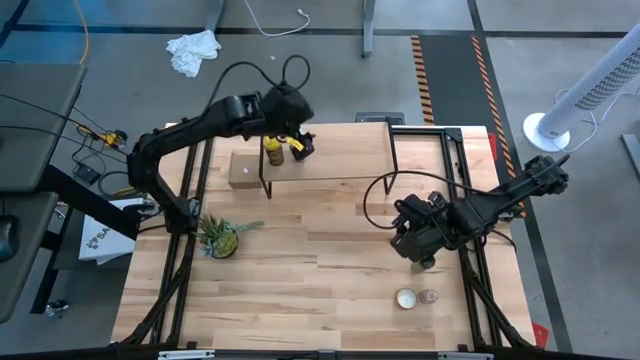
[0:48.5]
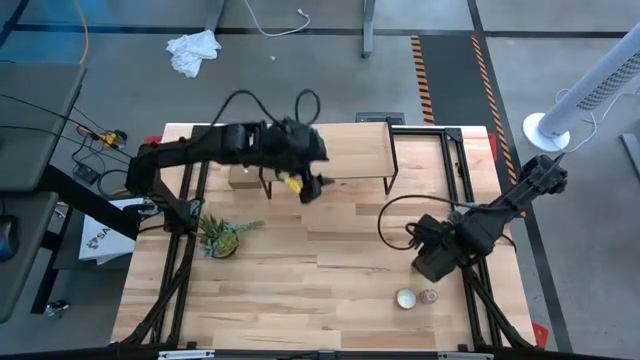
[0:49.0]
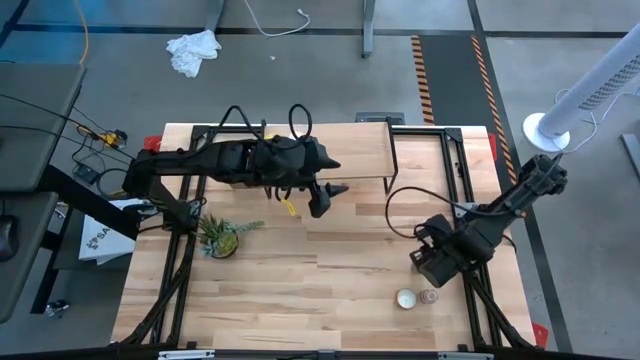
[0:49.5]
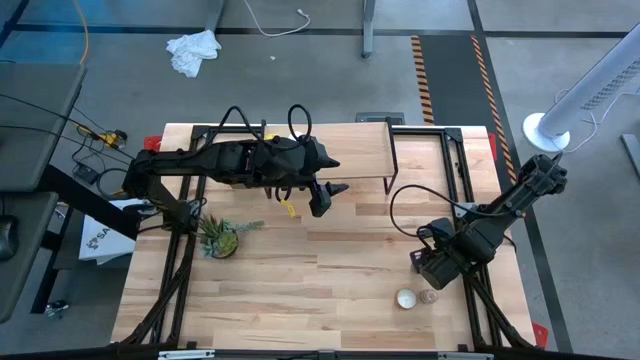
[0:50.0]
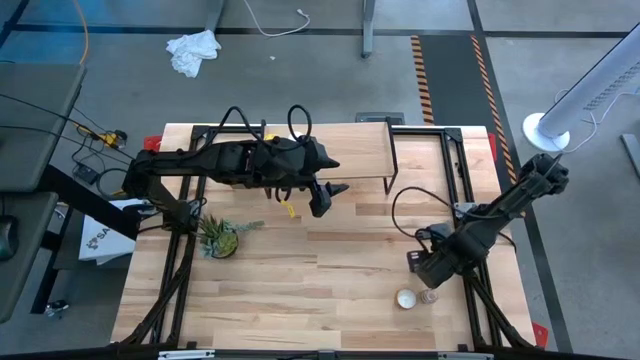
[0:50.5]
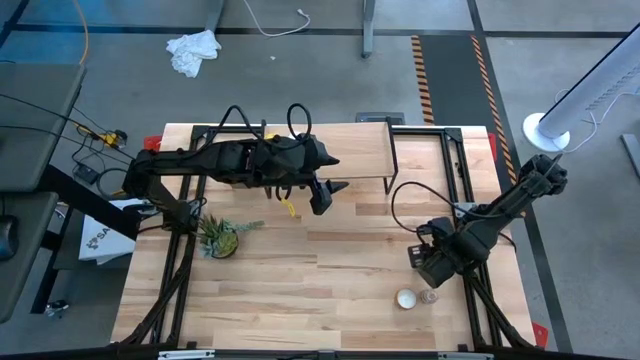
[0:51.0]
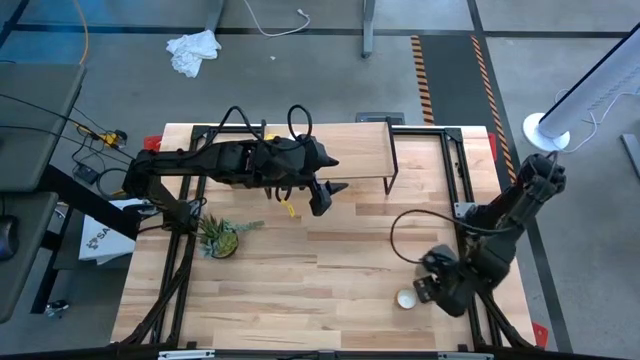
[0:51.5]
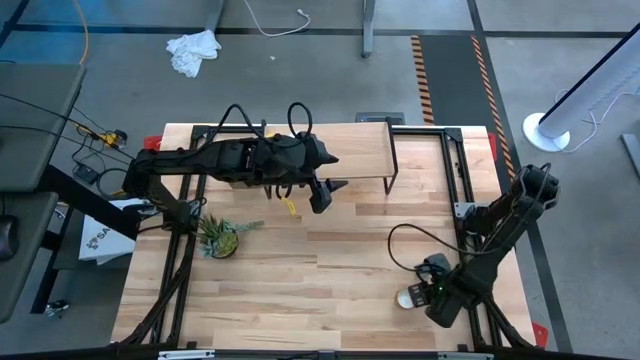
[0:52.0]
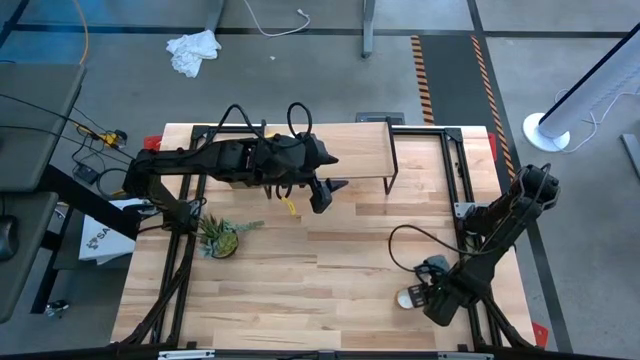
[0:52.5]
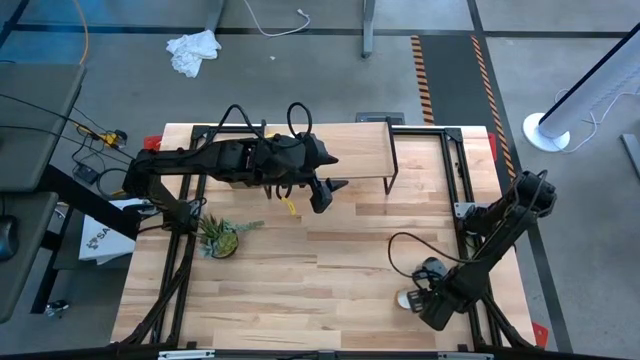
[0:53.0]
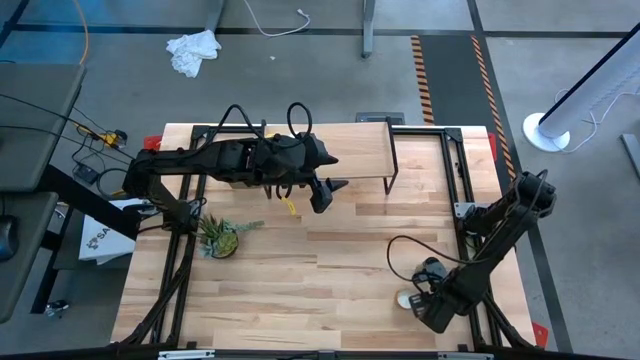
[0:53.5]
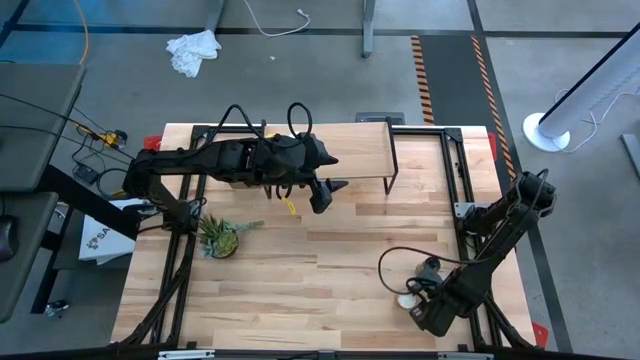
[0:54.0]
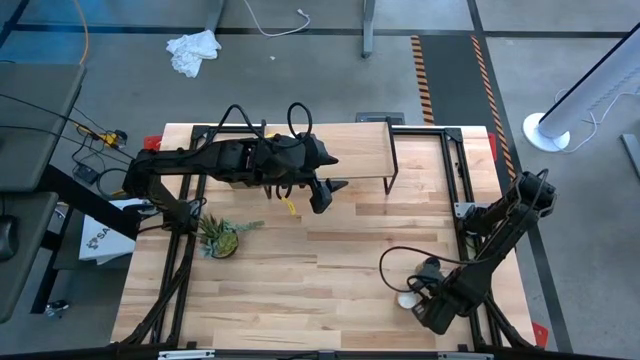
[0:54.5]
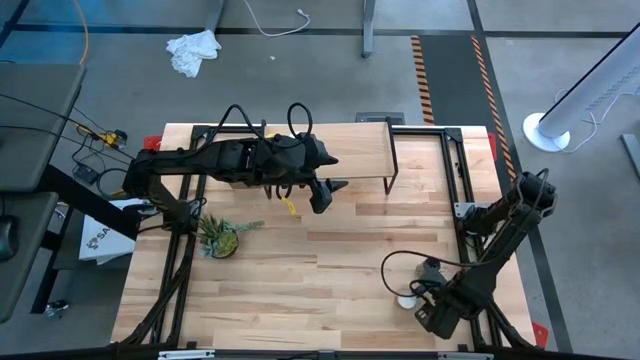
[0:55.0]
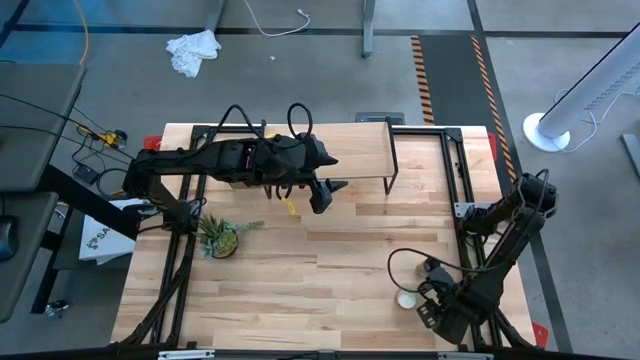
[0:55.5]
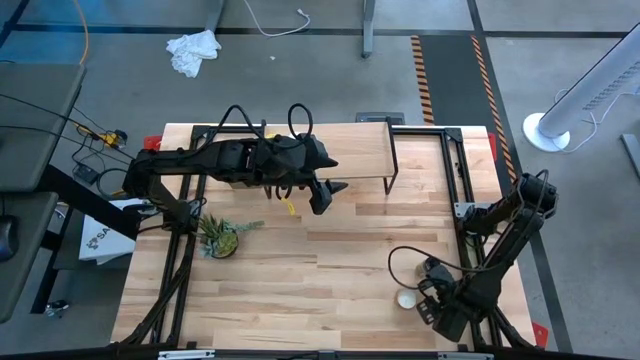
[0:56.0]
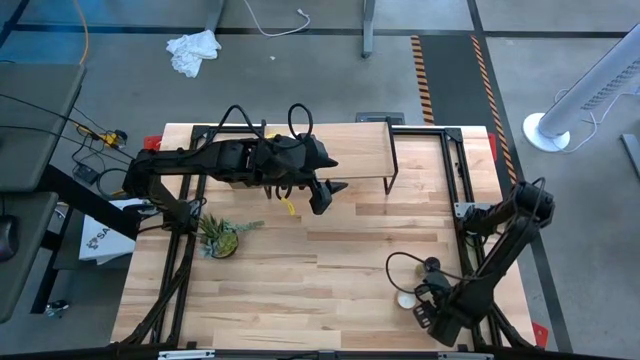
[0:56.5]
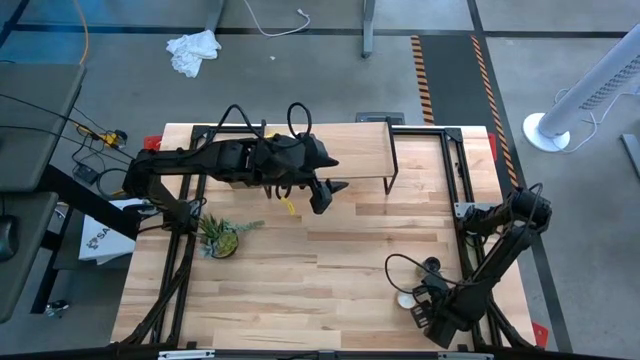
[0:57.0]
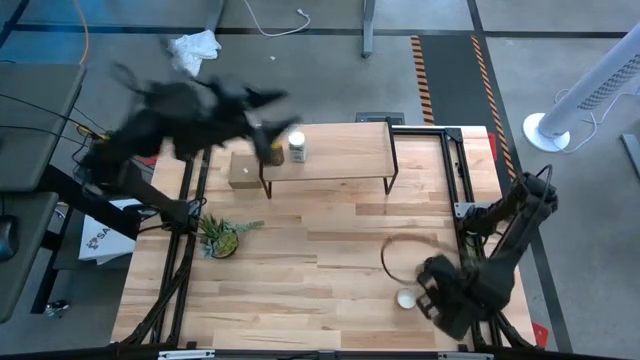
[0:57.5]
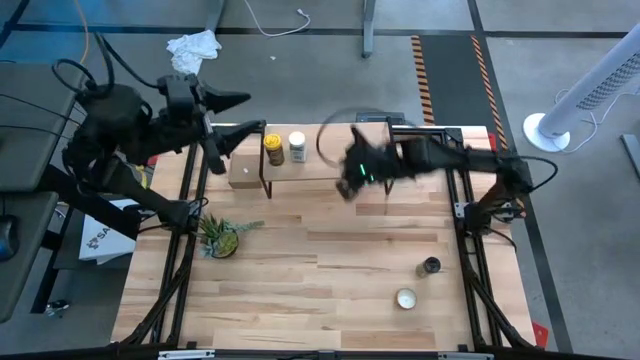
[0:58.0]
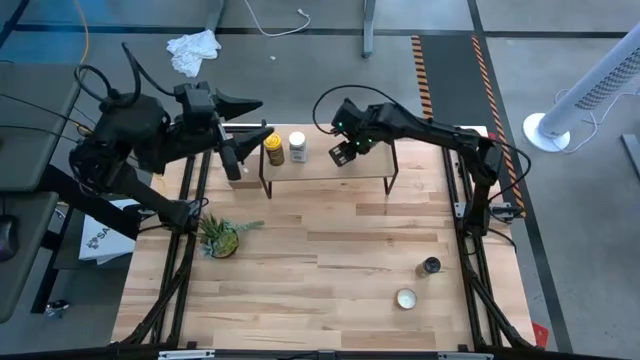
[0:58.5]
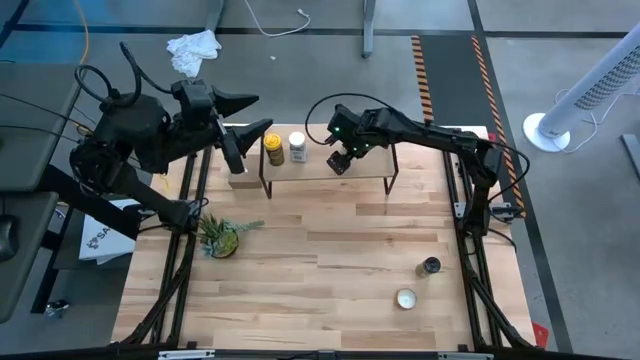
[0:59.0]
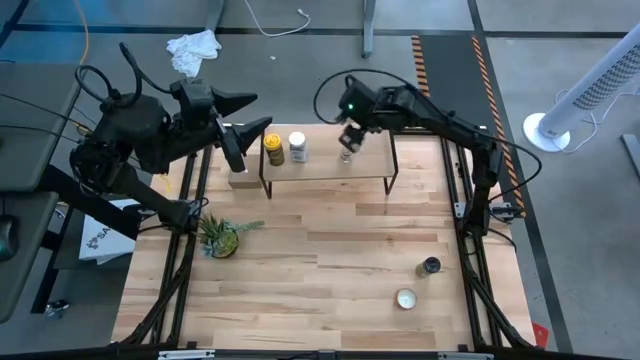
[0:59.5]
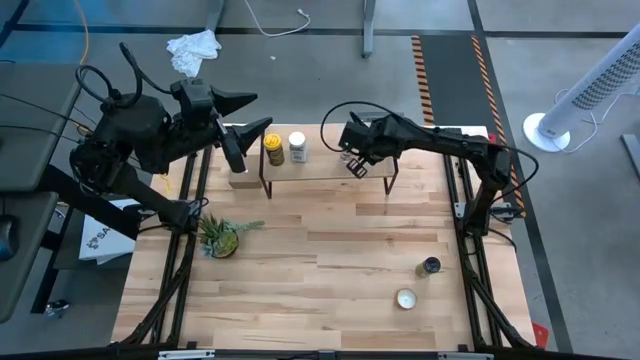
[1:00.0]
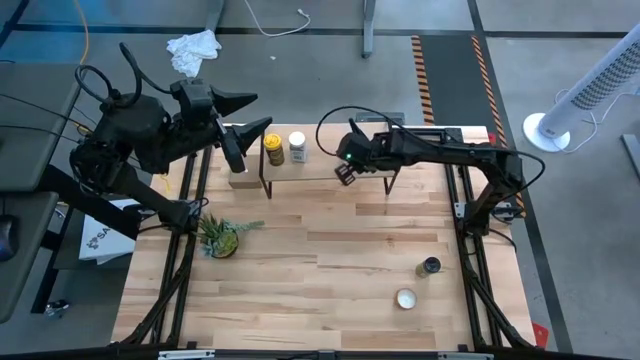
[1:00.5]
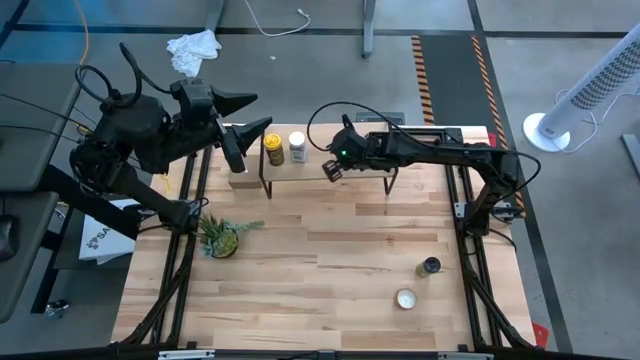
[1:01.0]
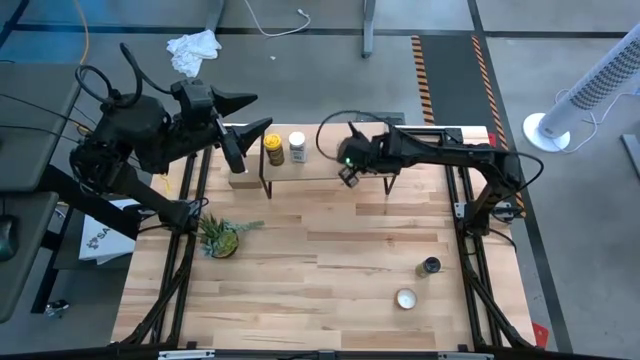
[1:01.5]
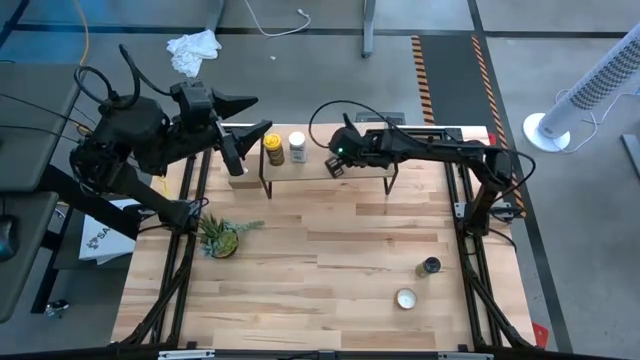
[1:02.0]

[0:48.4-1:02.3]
Task: Shelf spices
Put the black seasoning bottle on the shelf

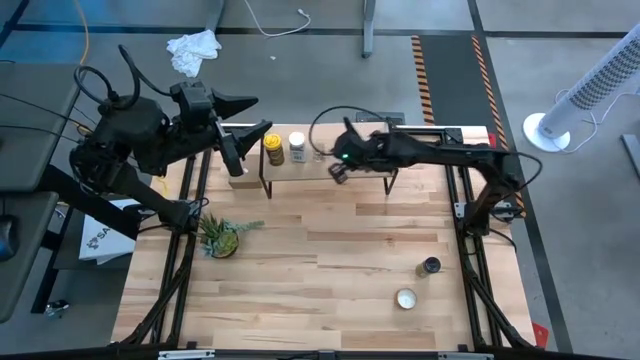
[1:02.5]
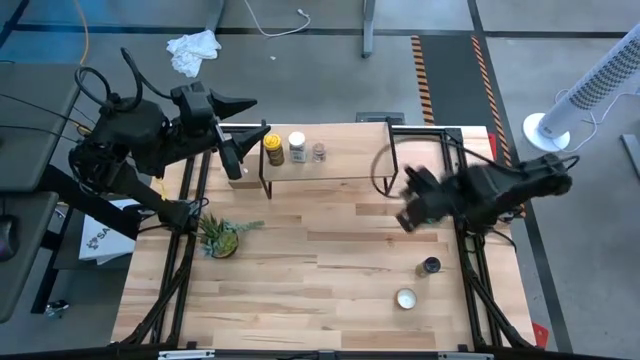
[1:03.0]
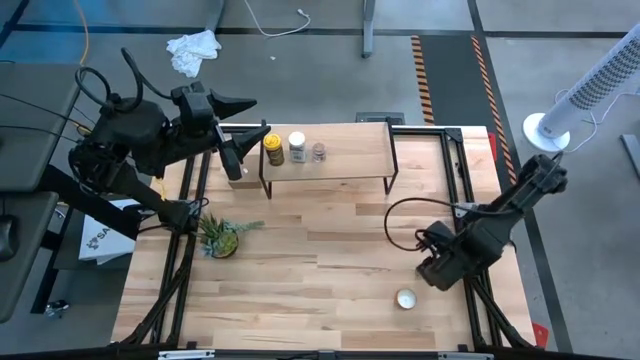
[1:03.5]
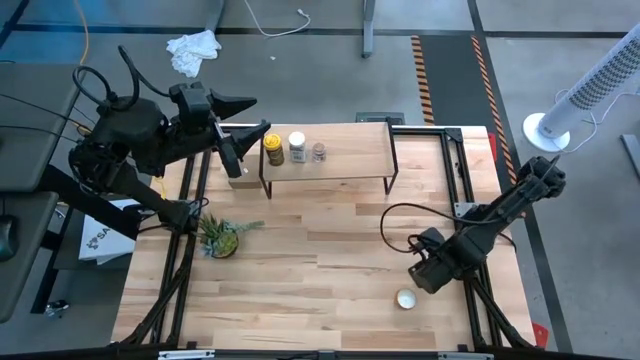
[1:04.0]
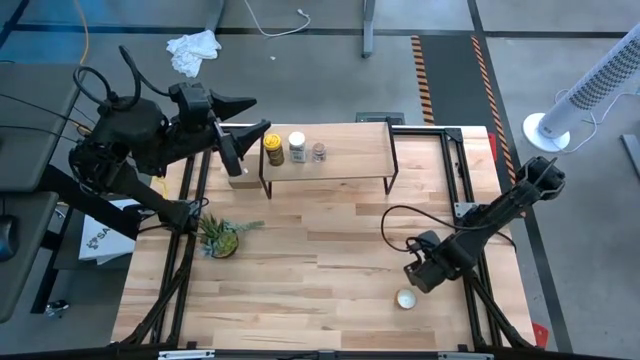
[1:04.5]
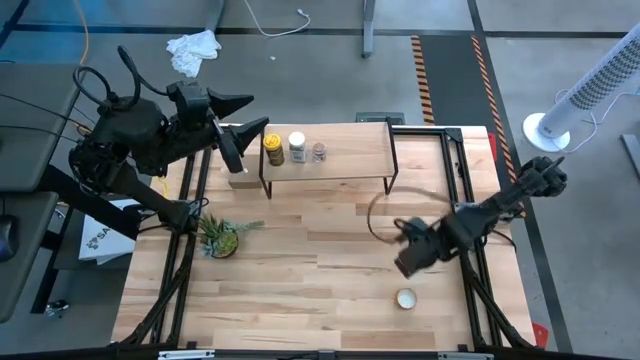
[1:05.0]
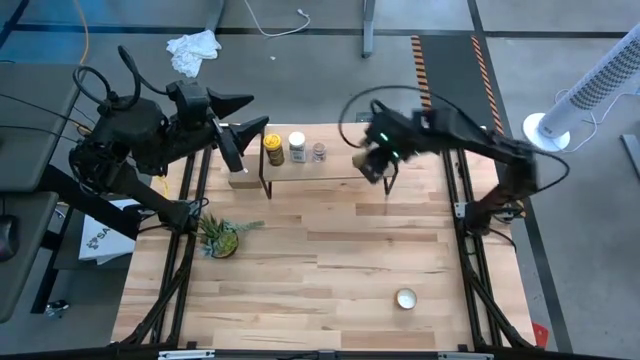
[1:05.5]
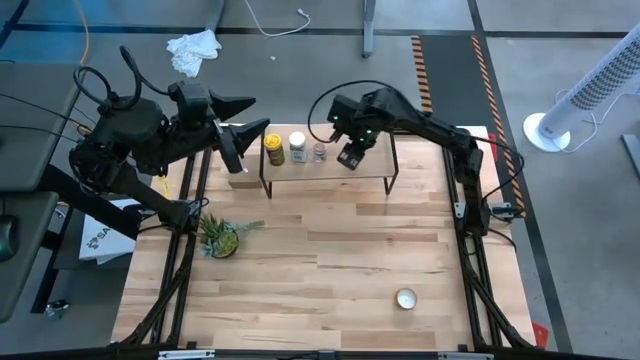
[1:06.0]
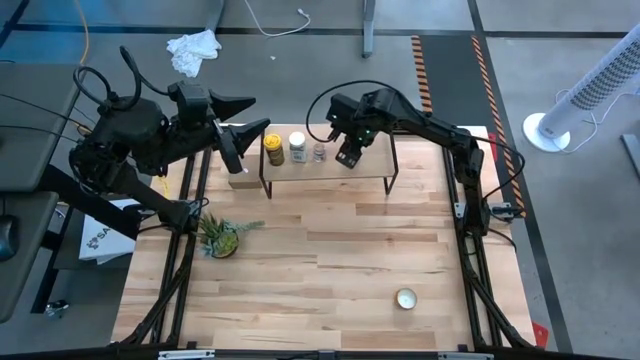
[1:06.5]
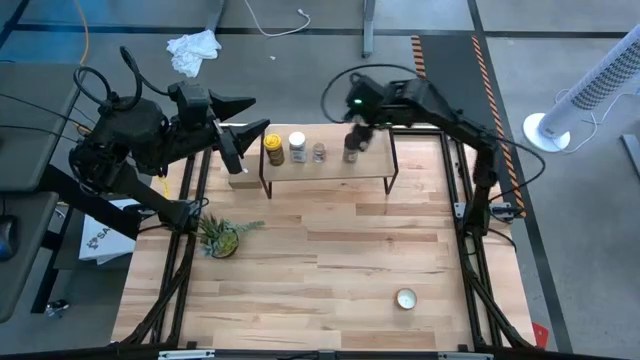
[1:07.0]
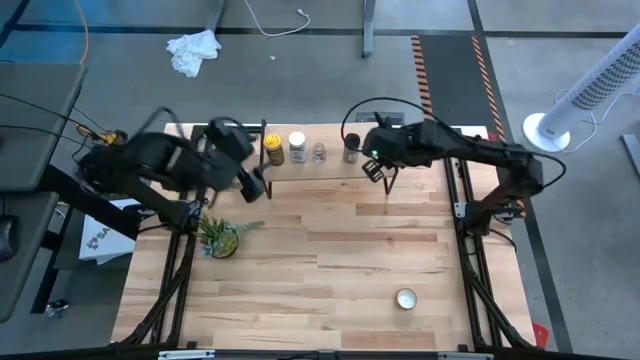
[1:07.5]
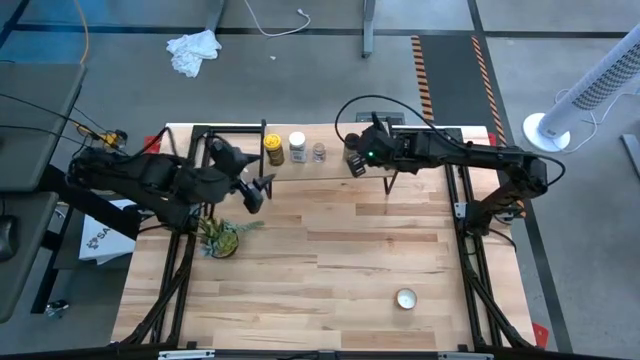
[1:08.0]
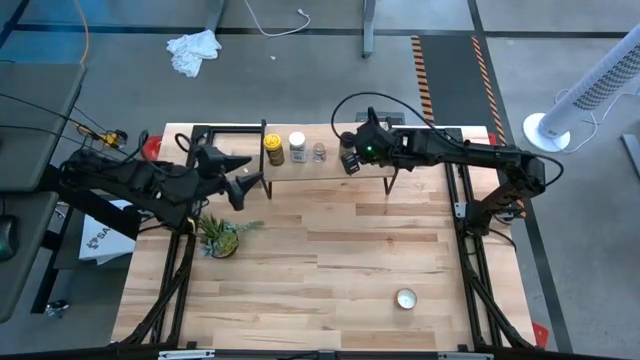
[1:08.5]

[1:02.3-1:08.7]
Put the black seasoning bottle on the shelf

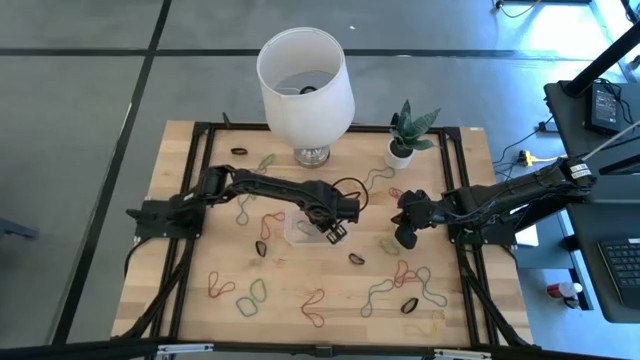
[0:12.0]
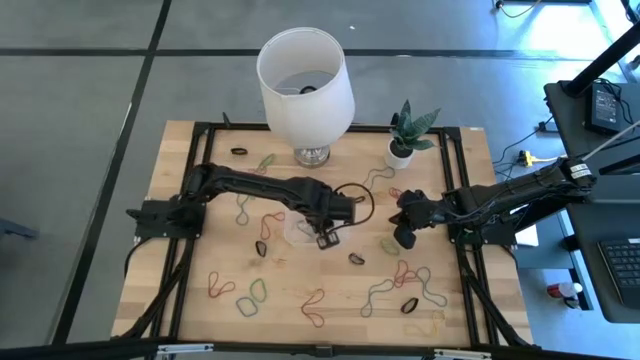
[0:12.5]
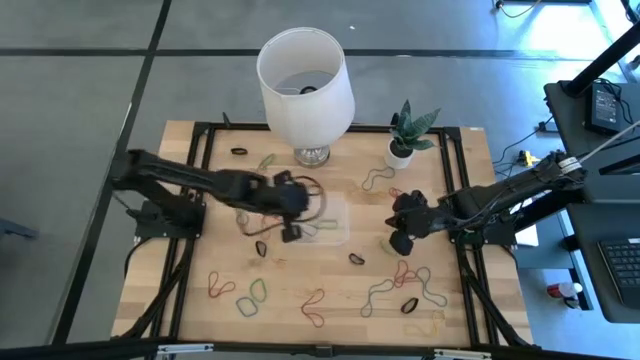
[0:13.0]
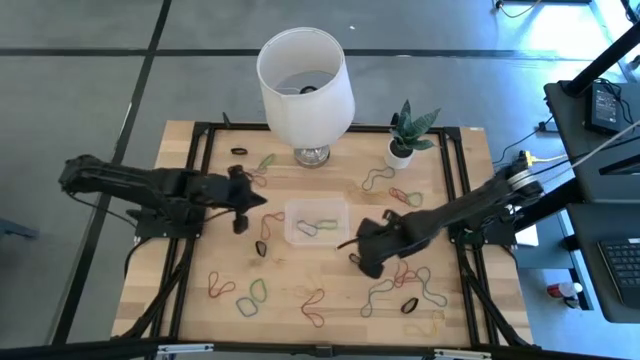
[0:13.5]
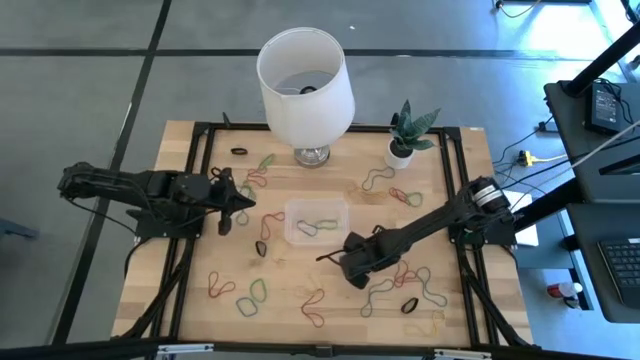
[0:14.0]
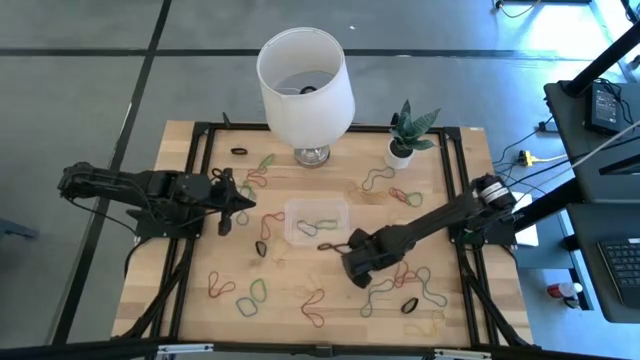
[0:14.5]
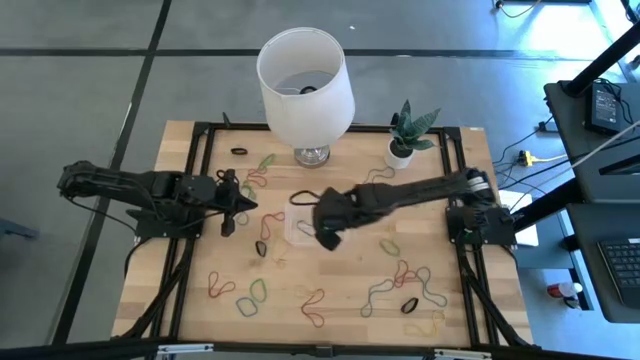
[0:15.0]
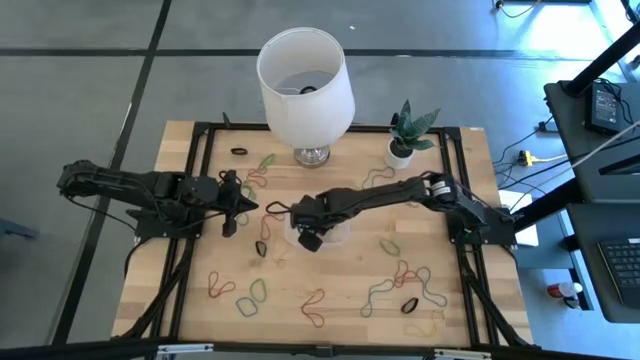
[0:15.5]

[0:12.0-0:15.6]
Task: Pick and place rubber bands into bin
Put the black rubber band into the transparent bin
